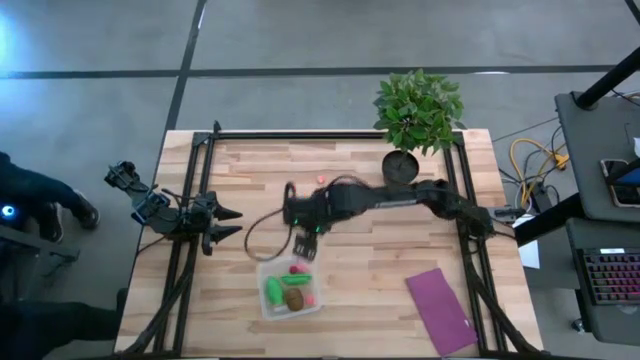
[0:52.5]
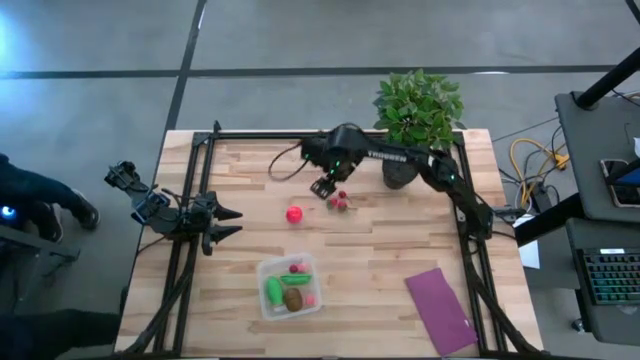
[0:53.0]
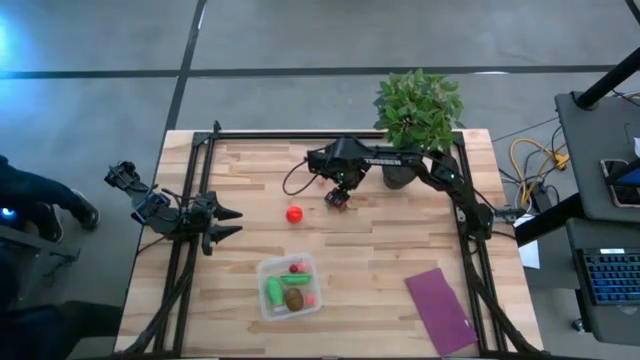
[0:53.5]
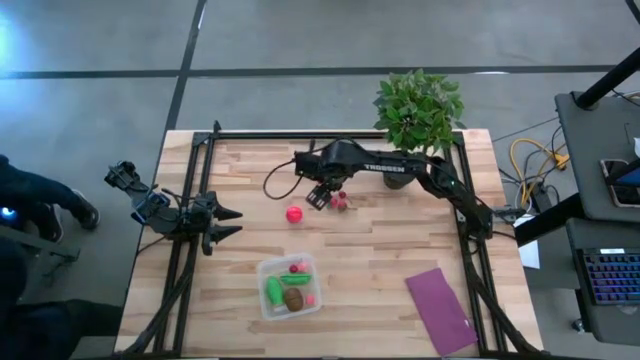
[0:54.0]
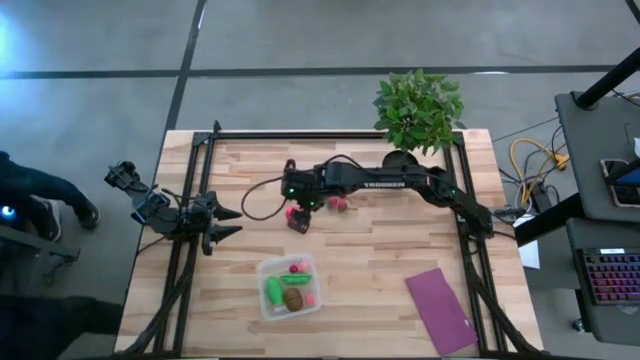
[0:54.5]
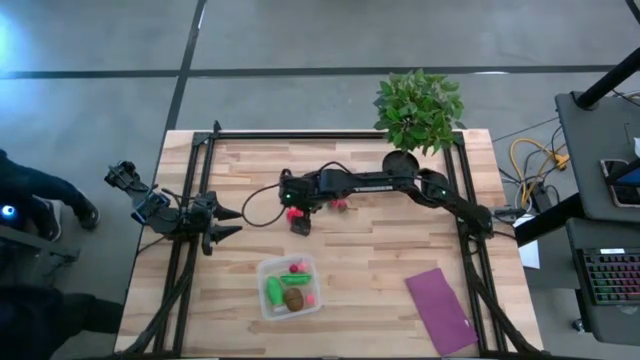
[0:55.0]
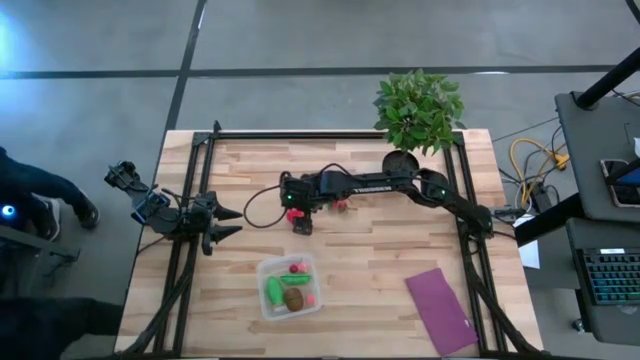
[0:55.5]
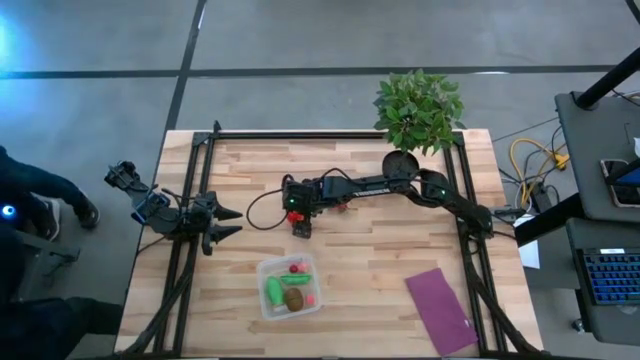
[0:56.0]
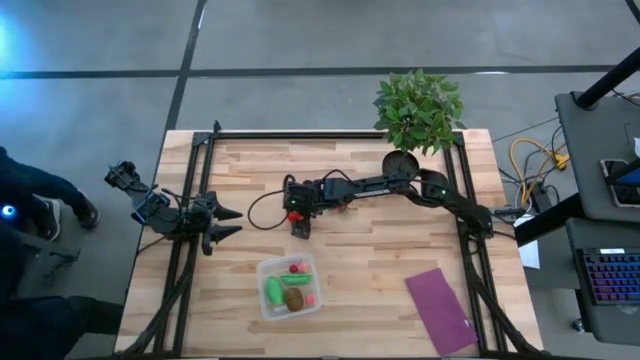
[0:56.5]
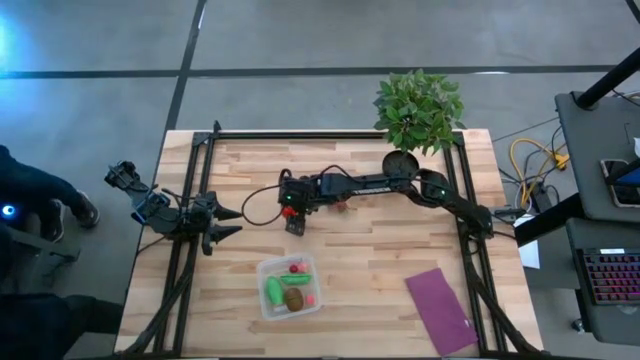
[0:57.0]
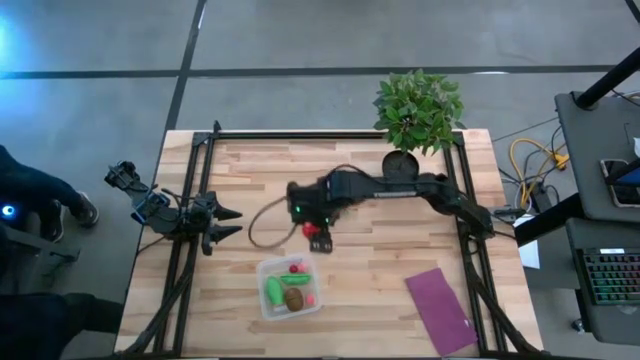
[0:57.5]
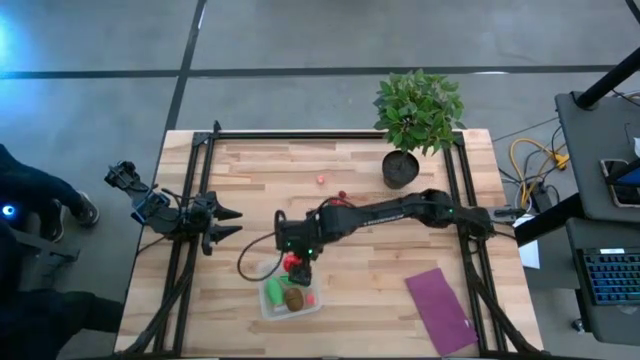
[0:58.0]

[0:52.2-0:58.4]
Task: Pick and placing Produce into tupperware
Put the tomato into the transparent bin

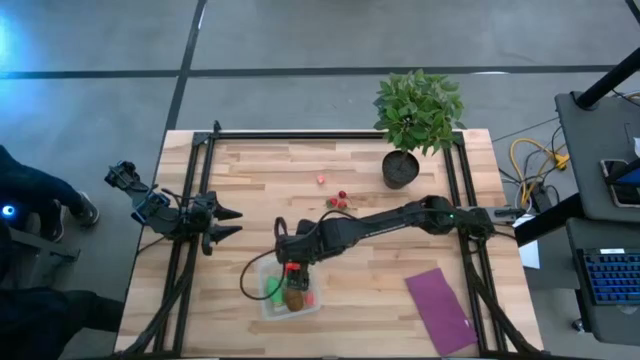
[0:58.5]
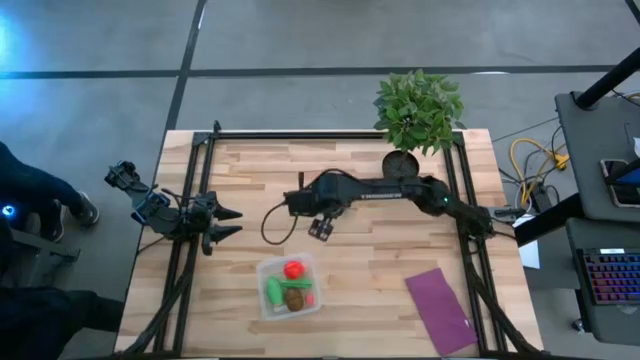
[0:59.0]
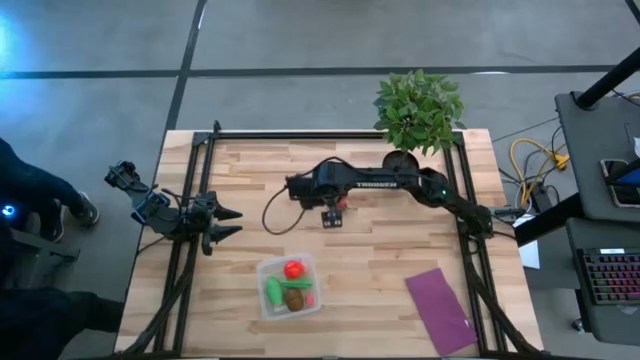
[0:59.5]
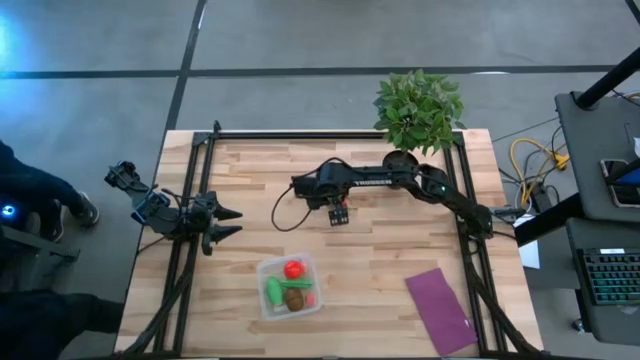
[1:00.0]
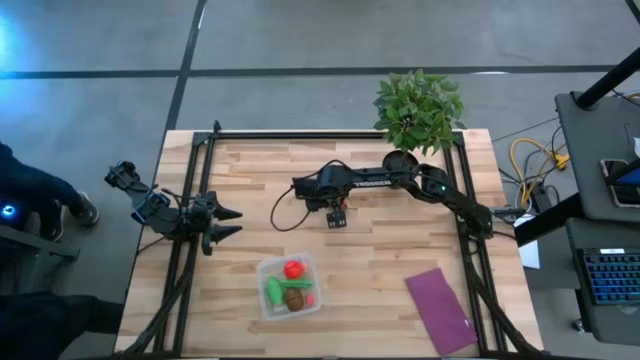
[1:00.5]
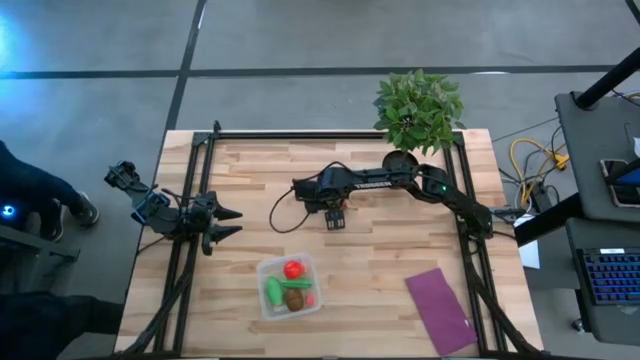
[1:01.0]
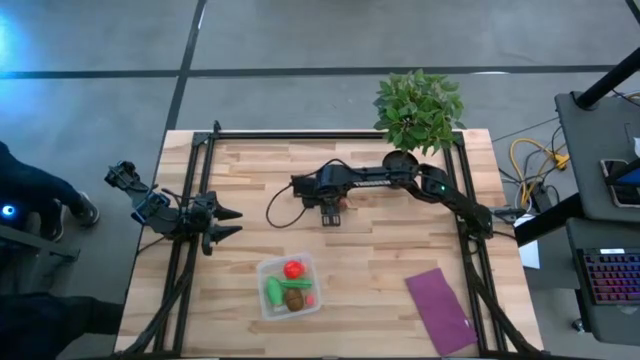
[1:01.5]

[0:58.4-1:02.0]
Put the left strawberry into the transparent bin

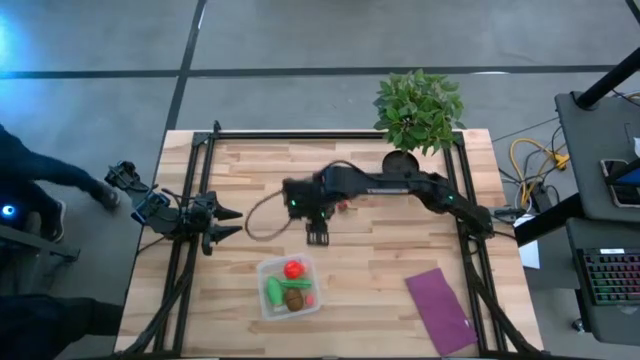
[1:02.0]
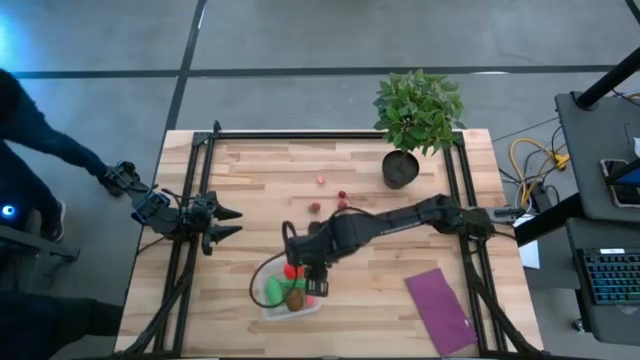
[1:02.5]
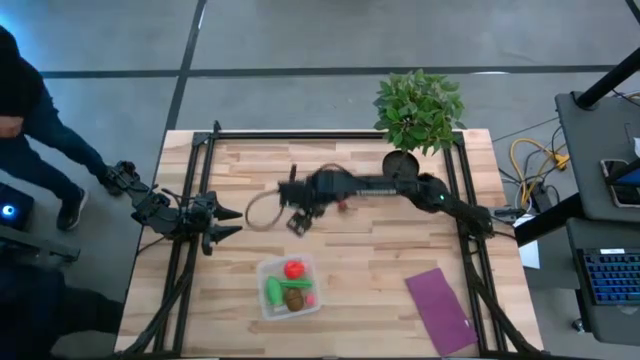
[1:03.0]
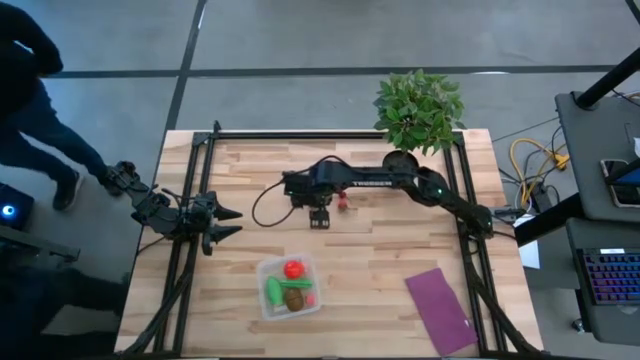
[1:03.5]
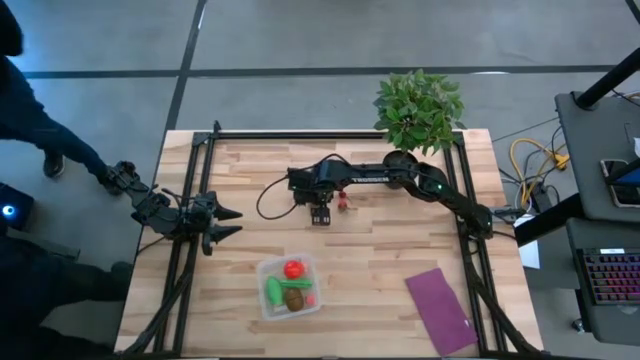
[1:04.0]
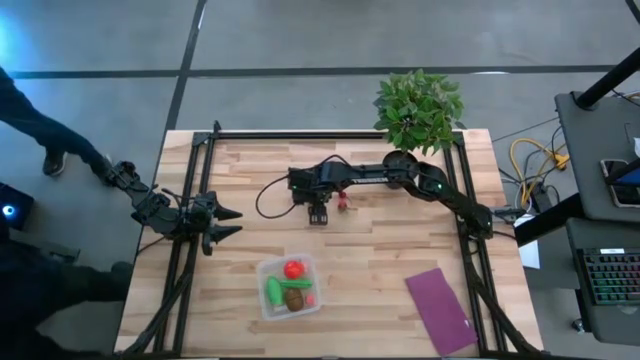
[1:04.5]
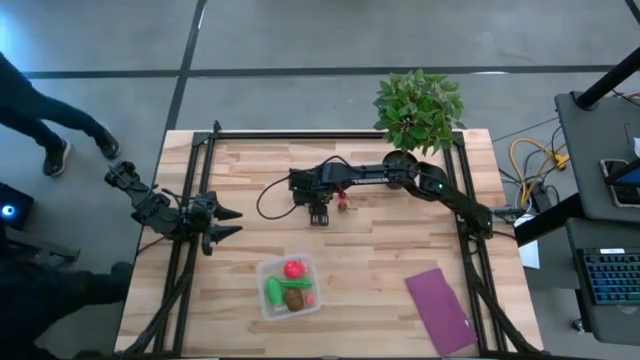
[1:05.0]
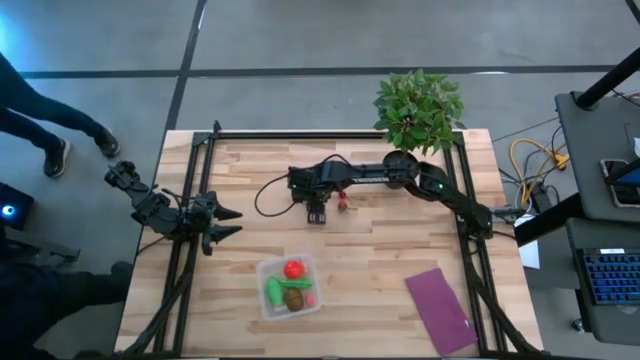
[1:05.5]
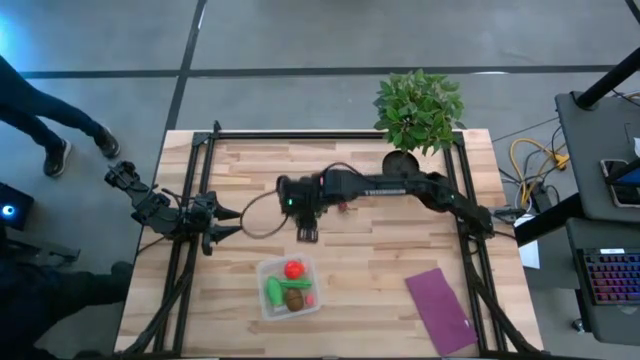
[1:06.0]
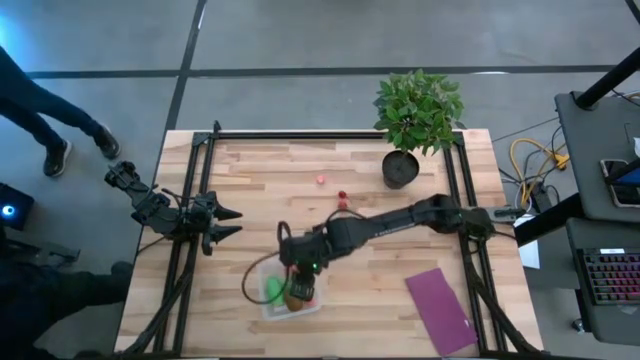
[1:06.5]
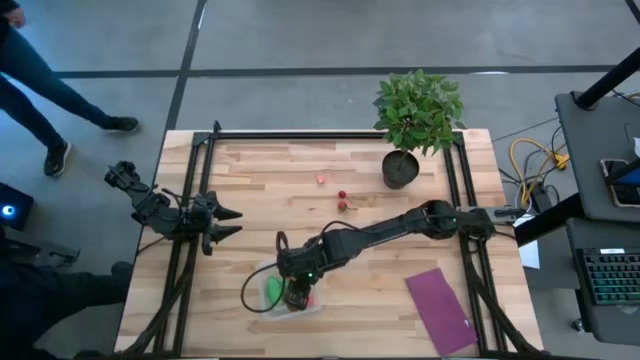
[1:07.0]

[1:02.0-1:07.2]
Put the left strawberry into the transparent bin

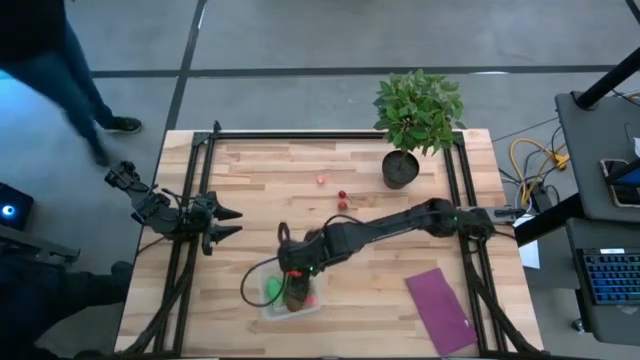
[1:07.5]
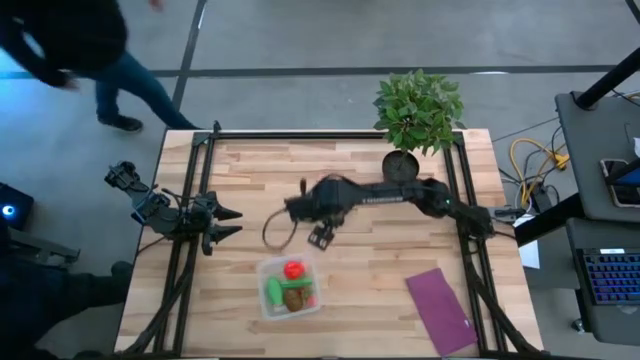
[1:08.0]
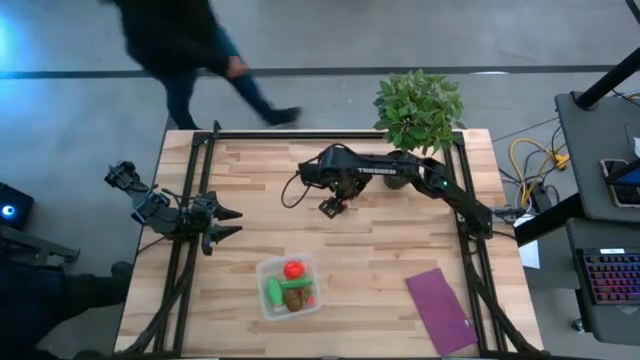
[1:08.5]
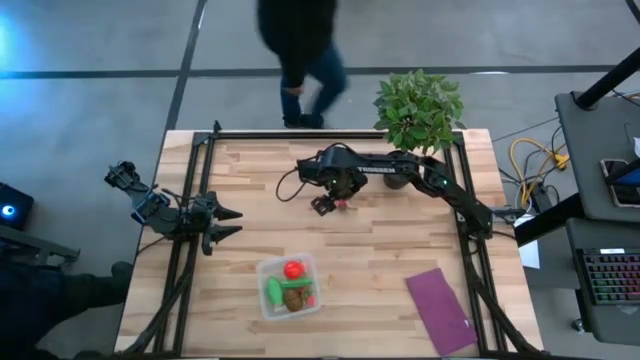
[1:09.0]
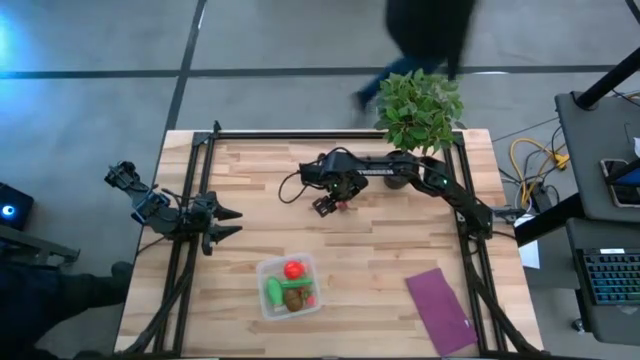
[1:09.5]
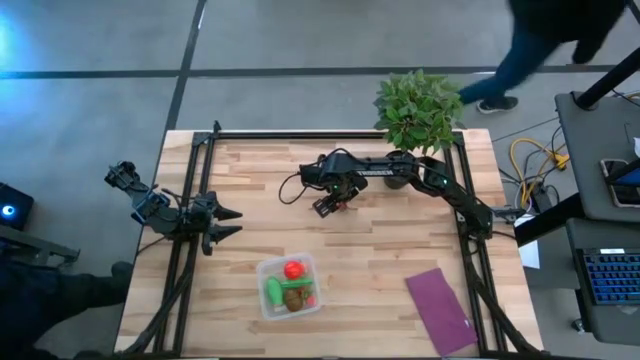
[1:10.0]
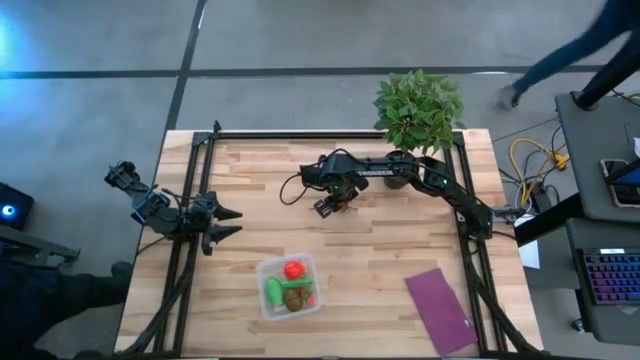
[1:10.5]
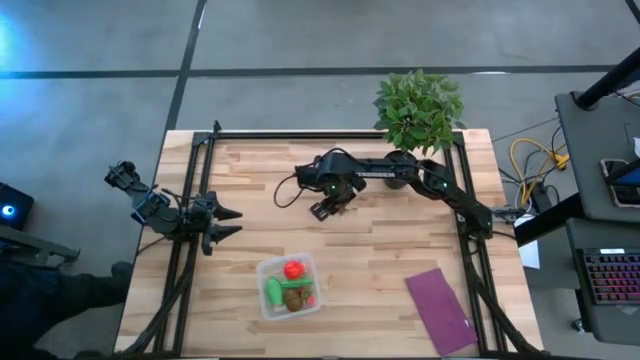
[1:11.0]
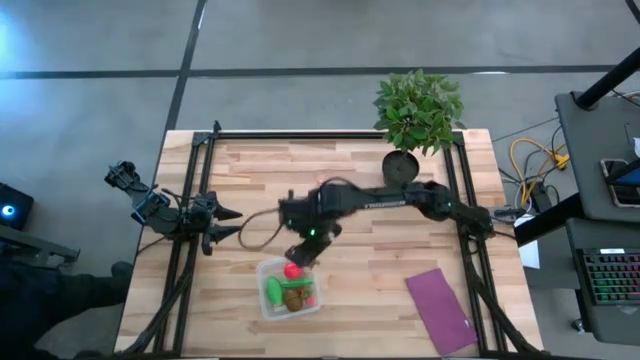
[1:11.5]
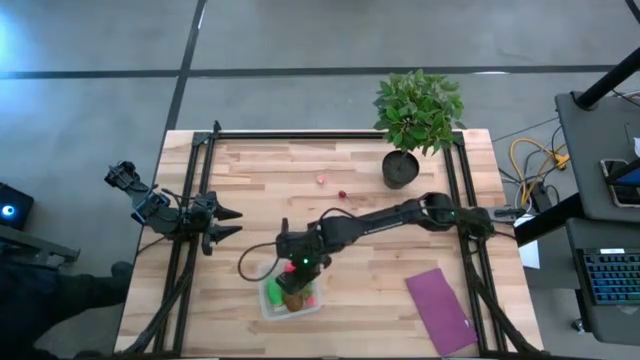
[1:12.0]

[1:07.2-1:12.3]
Put the strawberry into the transparent bin

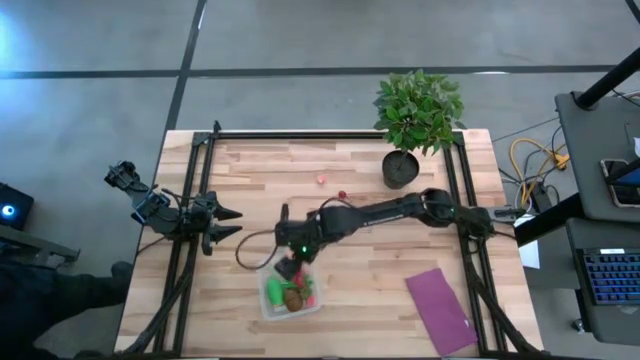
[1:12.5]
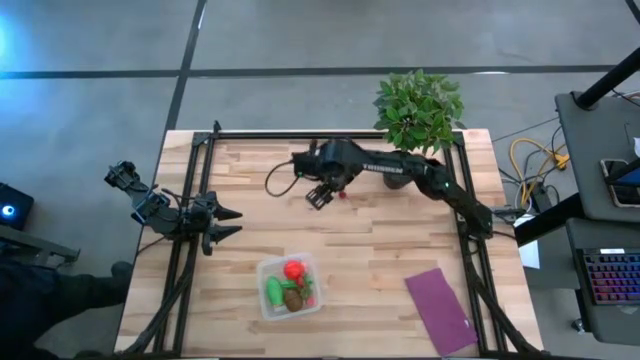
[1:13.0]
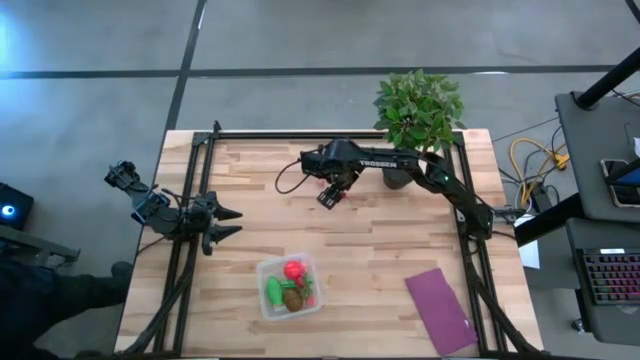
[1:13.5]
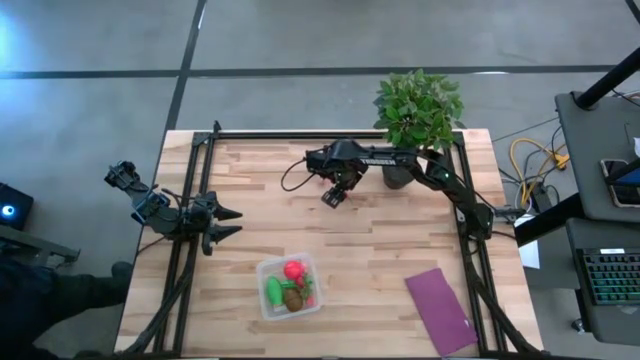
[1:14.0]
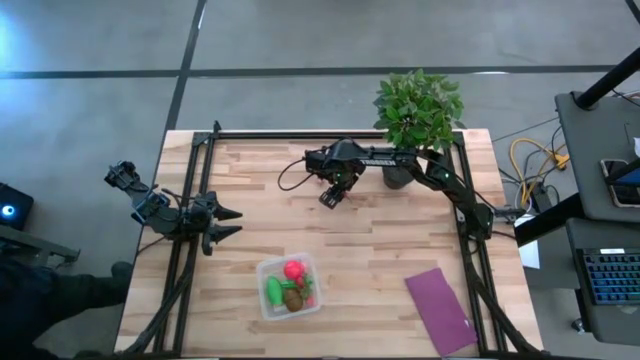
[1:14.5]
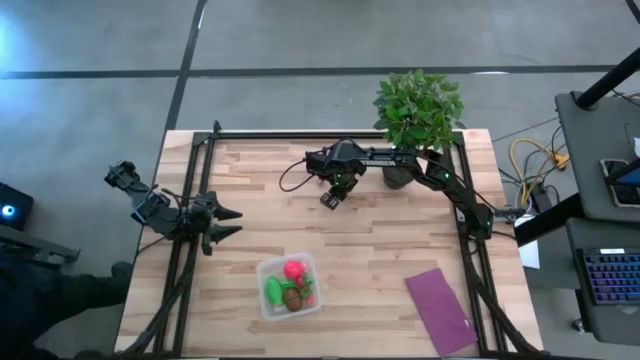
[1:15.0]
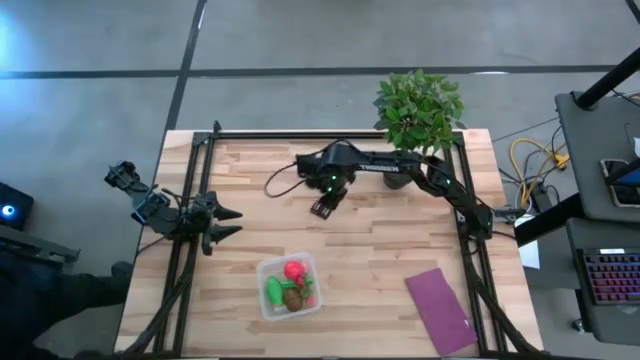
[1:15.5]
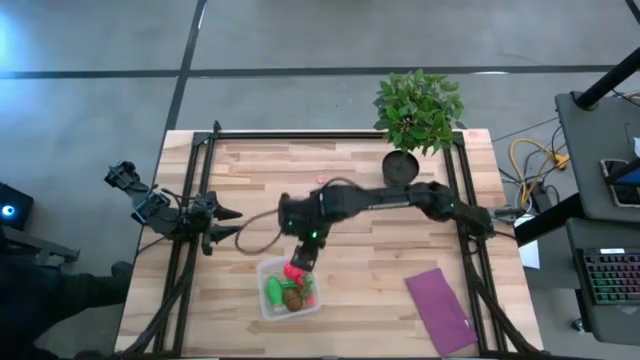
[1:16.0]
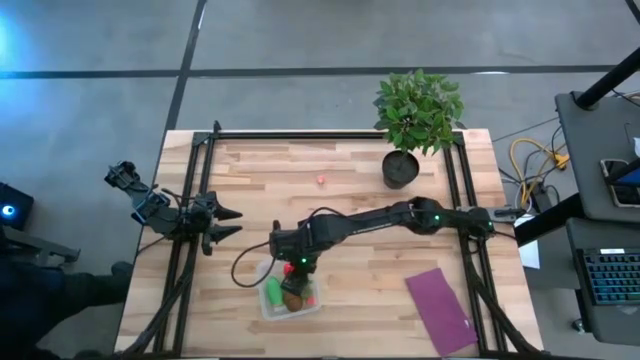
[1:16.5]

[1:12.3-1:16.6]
Put the cherry into the transparent bin
